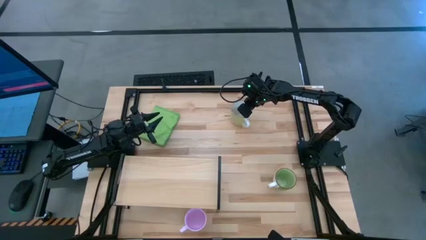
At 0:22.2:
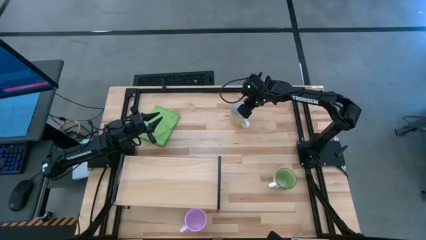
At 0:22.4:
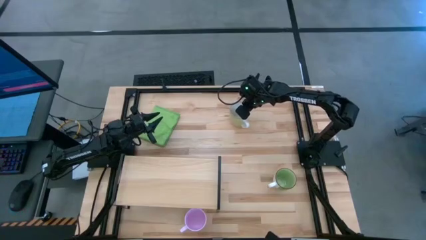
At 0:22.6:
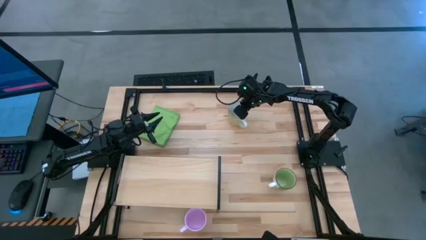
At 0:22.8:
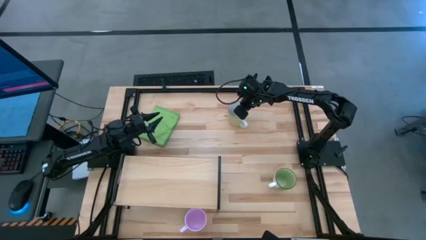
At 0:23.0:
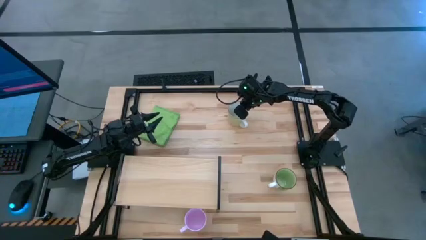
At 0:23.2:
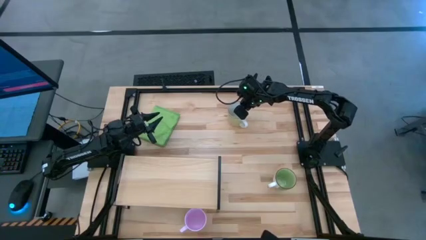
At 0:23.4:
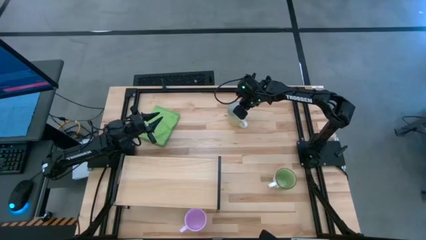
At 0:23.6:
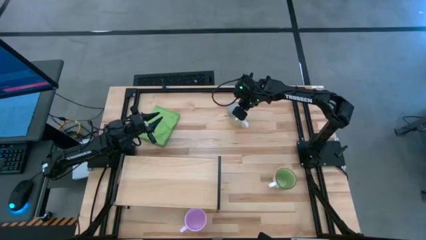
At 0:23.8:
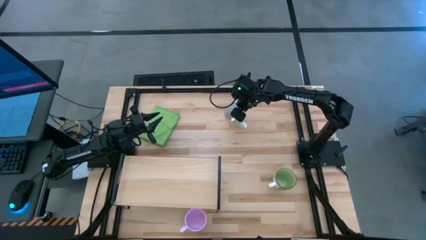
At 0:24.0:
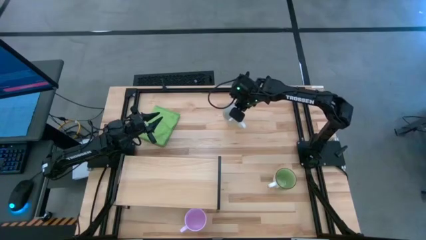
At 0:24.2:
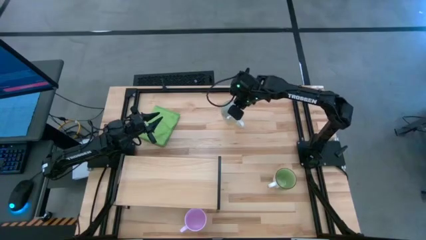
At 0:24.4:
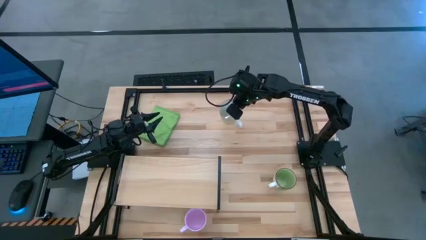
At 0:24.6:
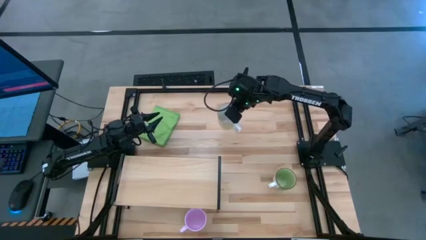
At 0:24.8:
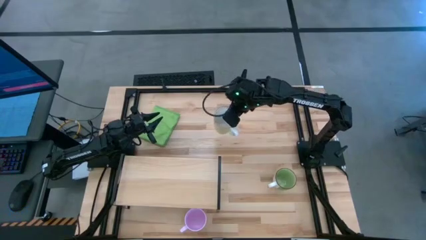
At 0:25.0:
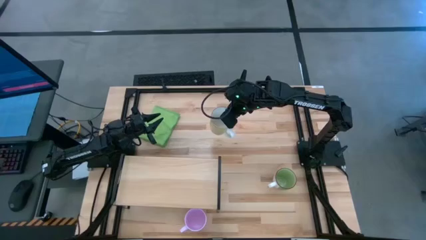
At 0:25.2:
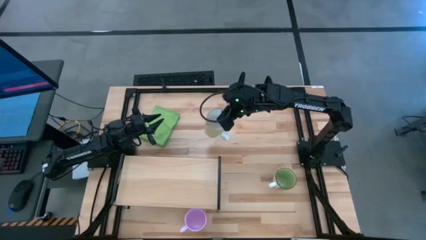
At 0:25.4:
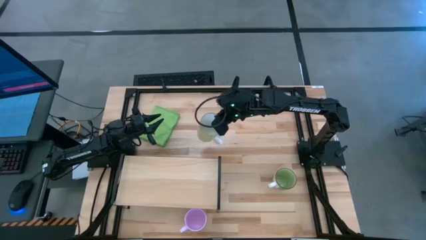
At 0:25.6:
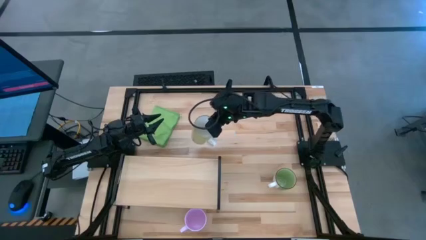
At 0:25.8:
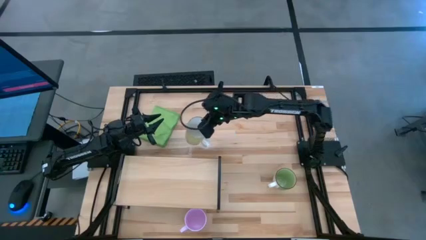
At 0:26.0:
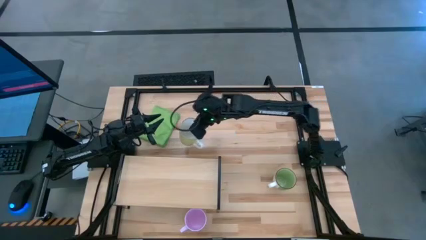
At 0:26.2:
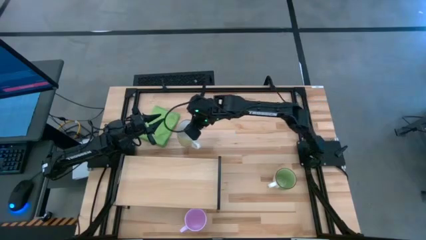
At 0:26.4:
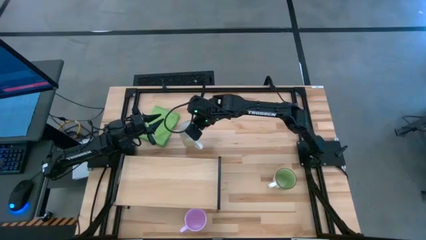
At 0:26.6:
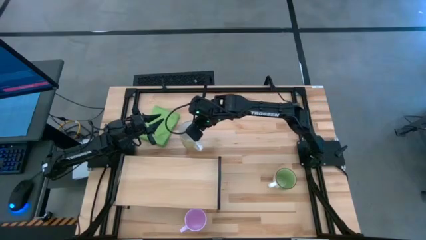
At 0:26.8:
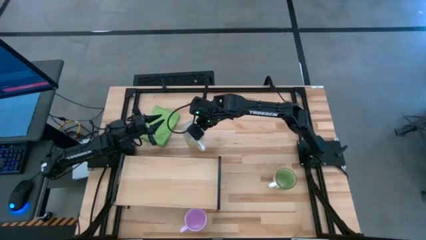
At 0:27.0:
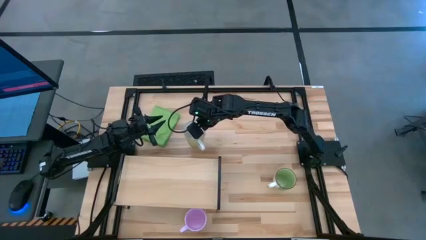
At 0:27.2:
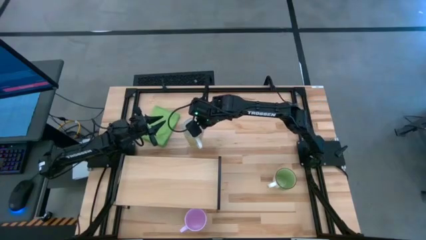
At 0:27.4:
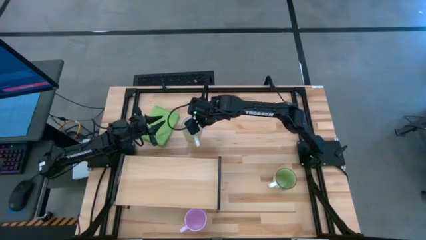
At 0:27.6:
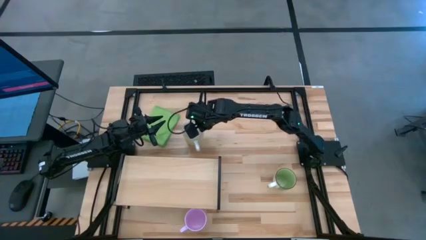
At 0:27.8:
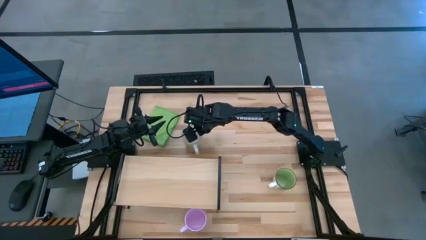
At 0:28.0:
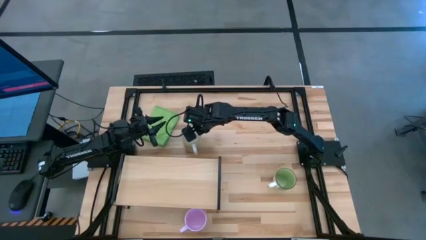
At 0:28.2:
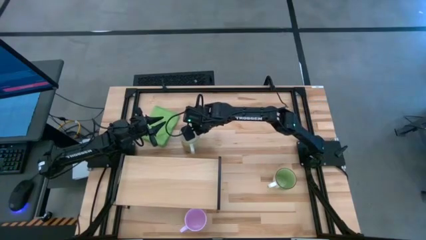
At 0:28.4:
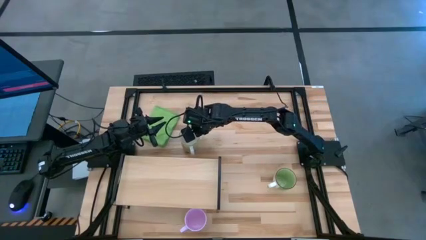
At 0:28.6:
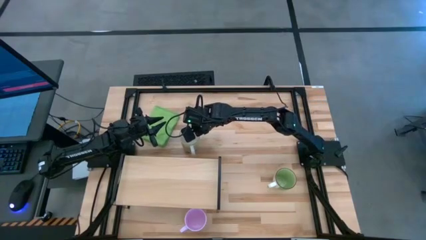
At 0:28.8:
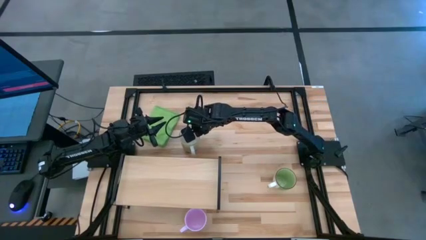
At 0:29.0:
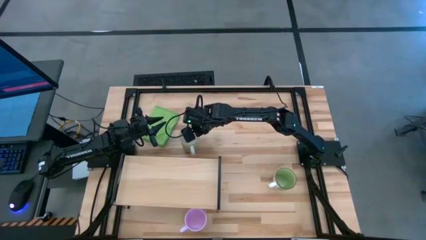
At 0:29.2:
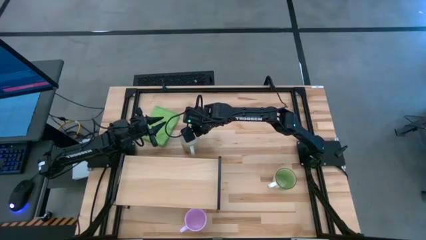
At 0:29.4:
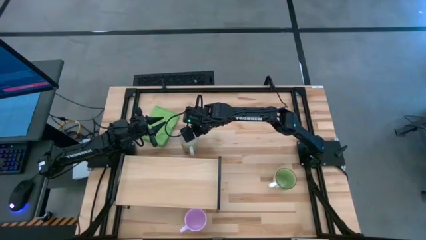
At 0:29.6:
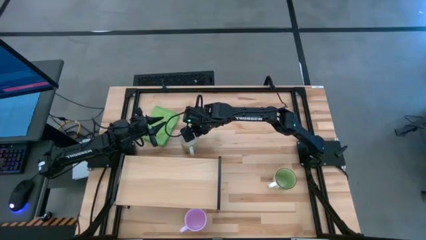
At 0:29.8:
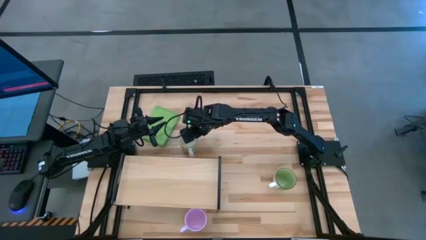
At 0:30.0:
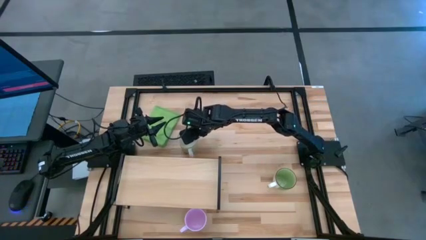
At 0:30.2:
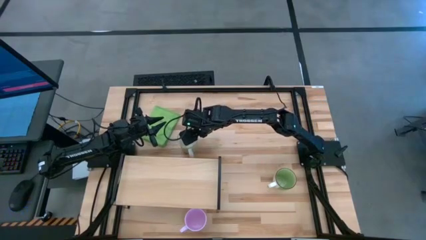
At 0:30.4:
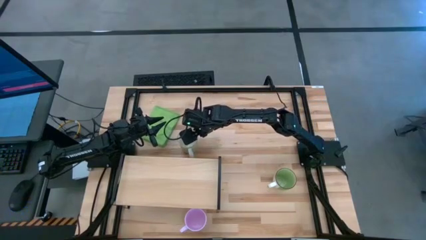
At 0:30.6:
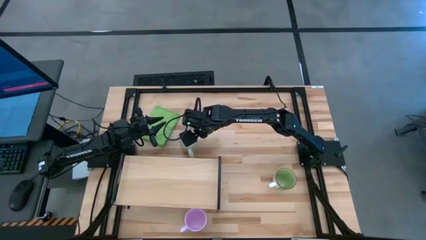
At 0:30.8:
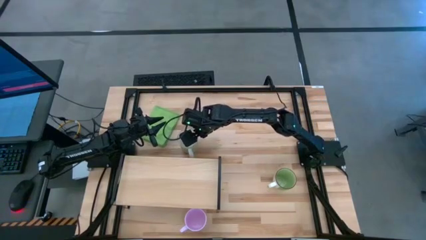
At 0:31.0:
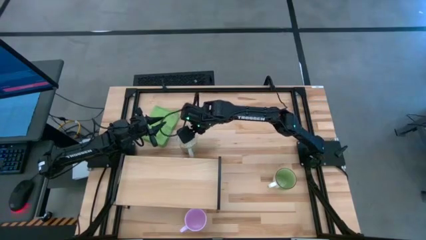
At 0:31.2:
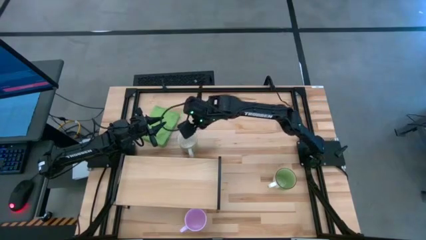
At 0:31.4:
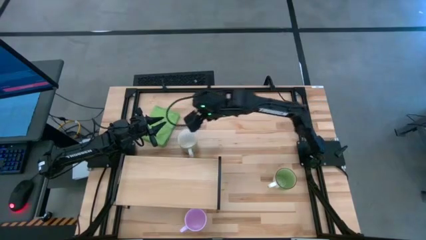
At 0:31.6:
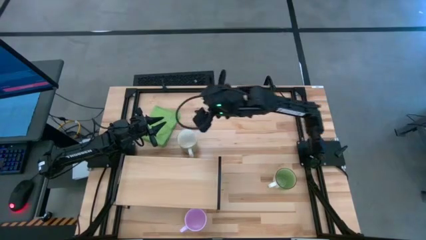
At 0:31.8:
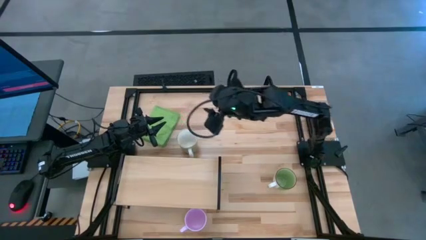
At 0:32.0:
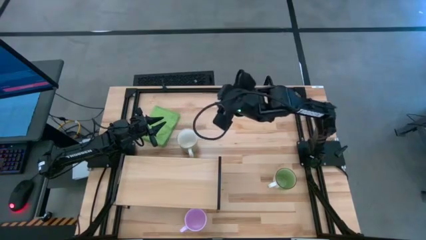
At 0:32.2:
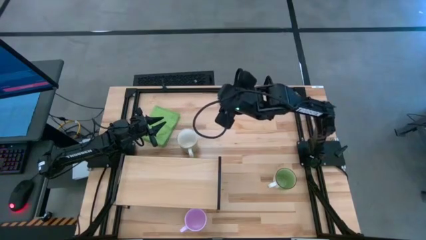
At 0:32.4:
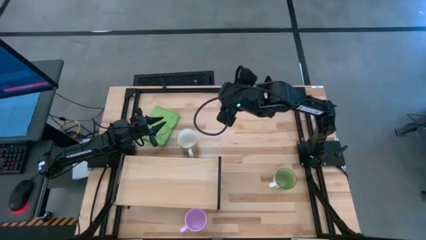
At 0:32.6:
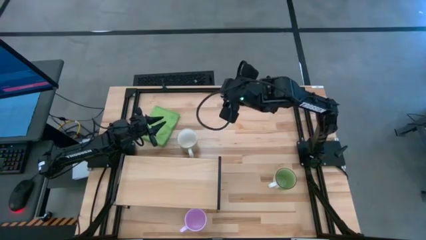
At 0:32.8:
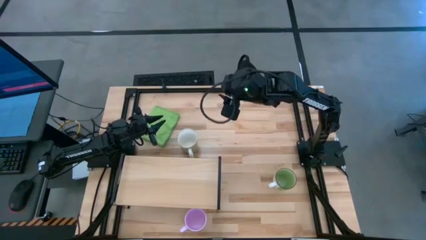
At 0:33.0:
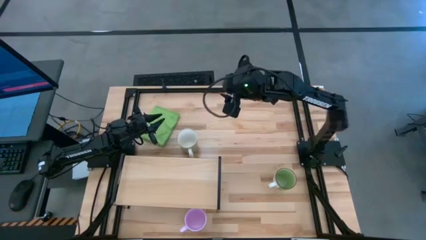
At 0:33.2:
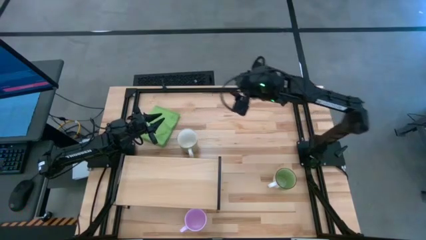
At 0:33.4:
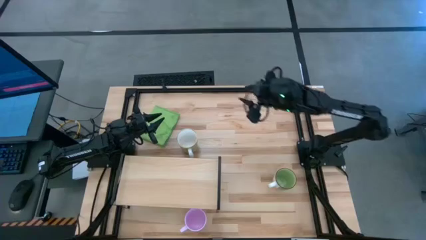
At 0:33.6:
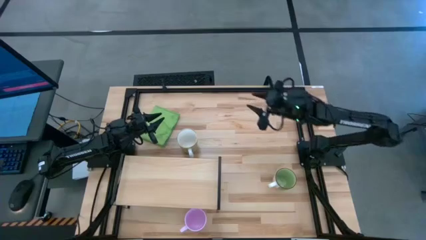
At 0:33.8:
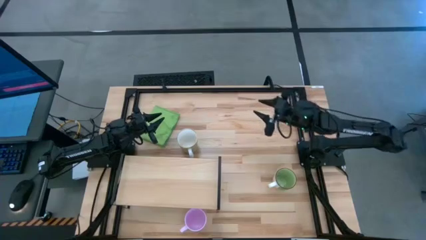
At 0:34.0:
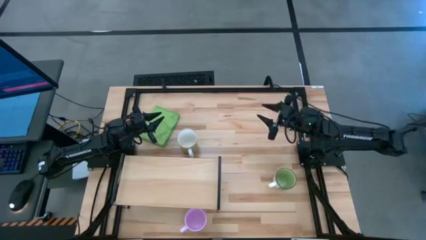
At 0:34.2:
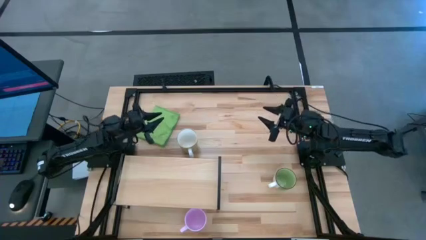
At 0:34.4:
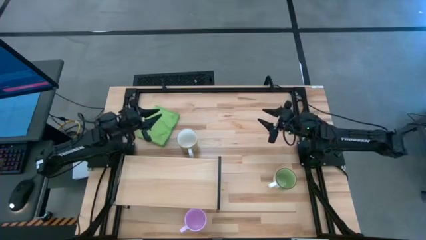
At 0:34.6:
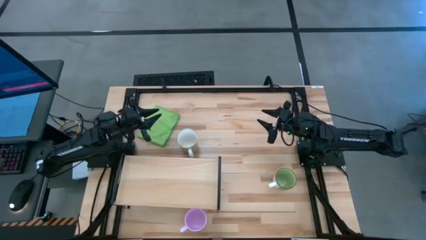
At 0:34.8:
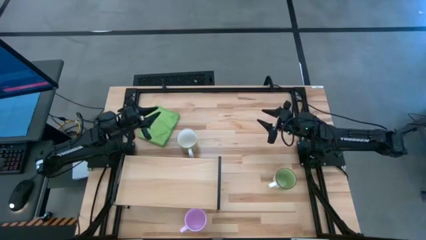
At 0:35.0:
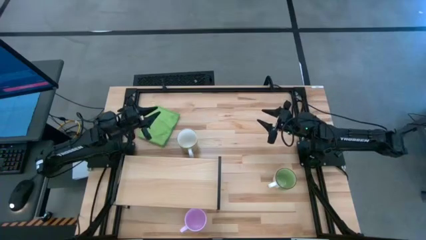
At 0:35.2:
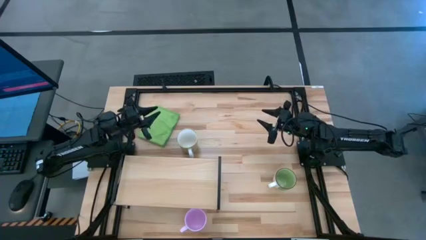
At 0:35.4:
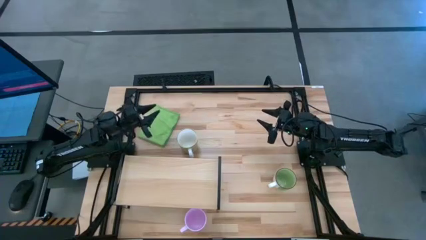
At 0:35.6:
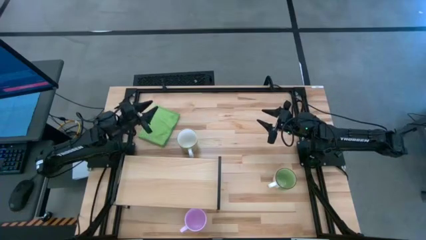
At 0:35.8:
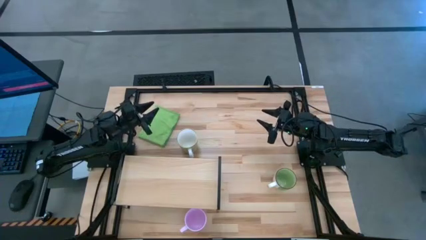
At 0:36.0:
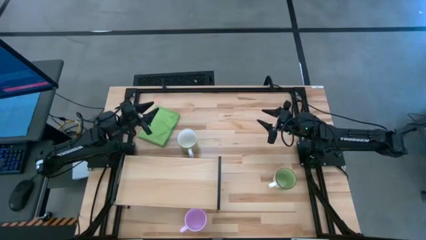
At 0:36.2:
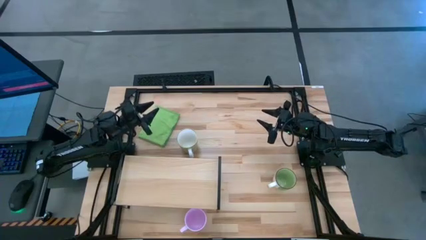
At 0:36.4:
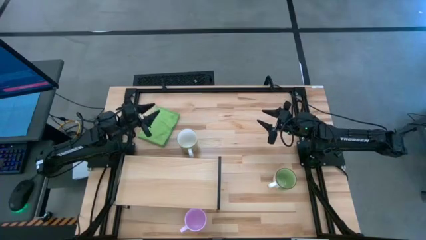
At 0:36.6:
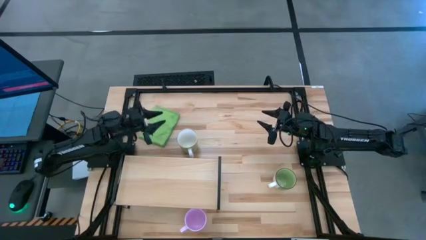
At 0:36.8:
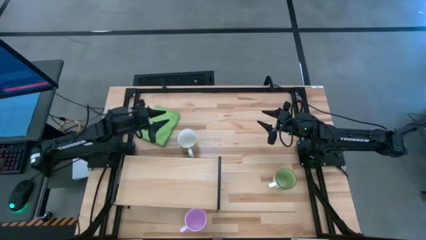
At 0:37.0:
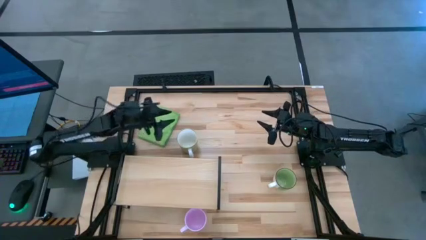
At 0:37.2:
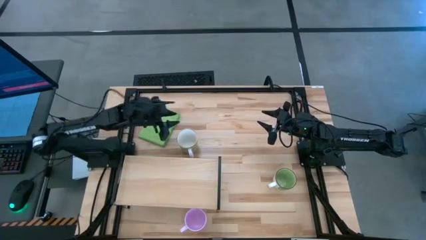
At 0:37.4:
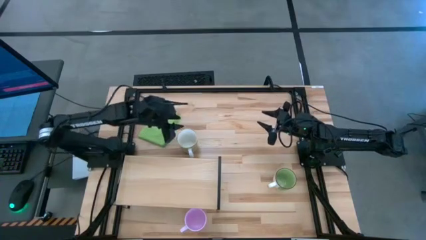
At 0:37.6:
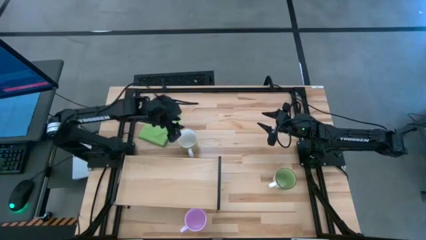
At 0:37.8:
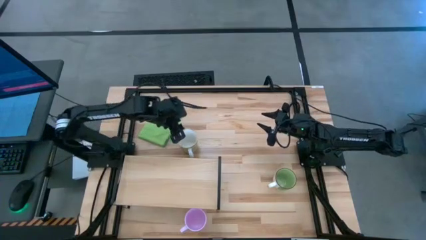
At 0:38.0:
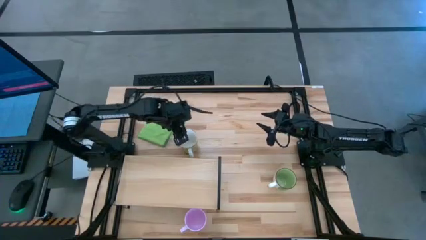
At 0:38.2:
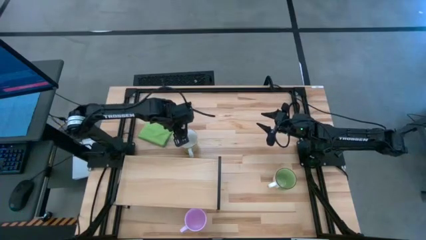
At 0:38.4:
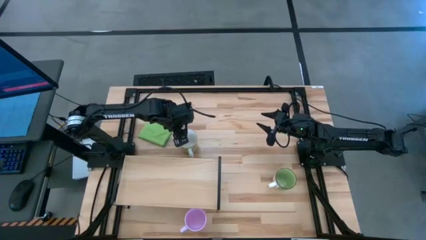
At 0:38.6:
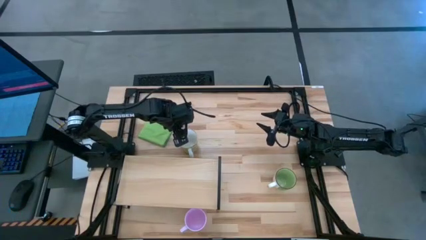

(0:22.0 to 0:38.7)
Task: Stack small to large cups/mugs on shelf
Put the light green mug on the shelf
